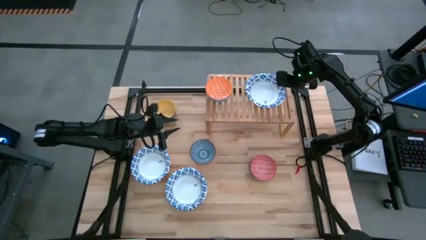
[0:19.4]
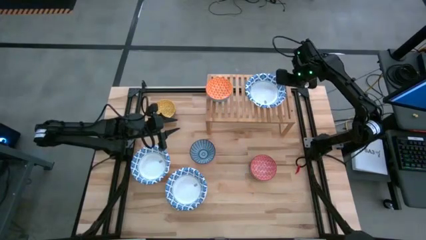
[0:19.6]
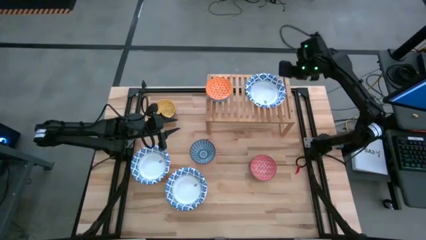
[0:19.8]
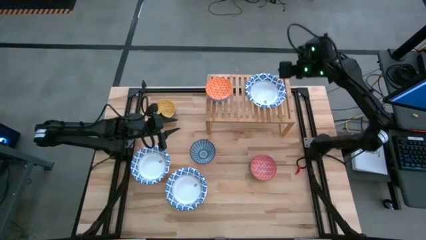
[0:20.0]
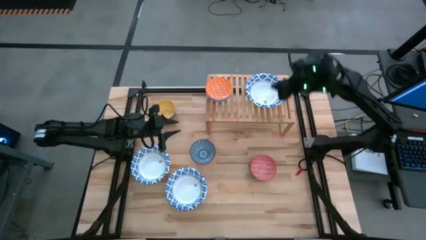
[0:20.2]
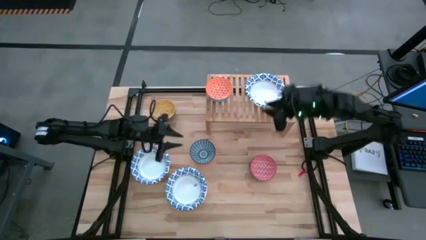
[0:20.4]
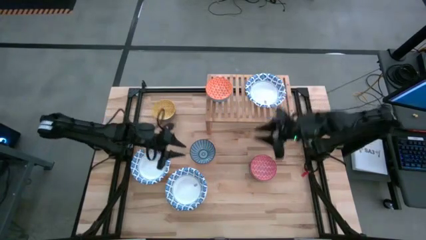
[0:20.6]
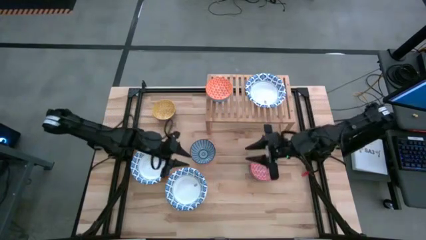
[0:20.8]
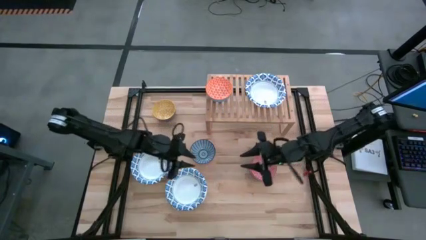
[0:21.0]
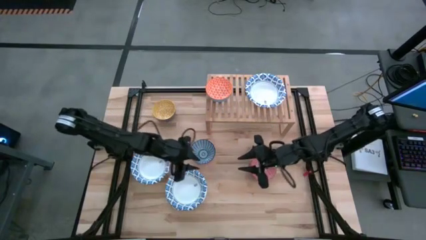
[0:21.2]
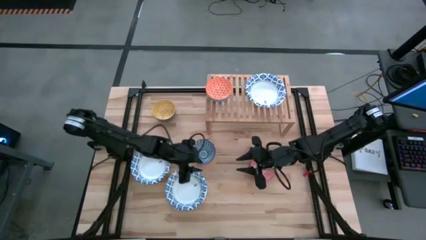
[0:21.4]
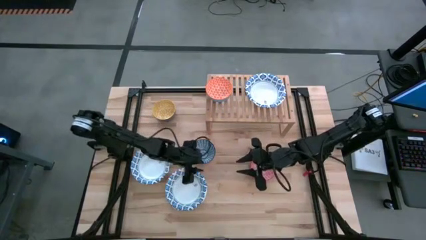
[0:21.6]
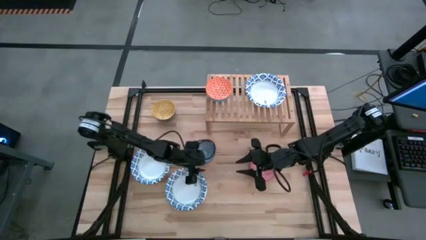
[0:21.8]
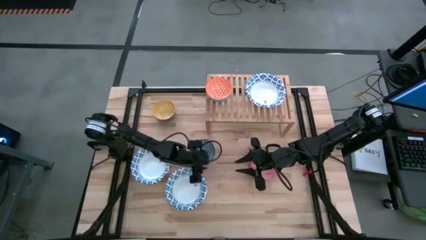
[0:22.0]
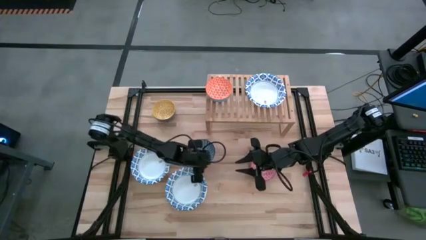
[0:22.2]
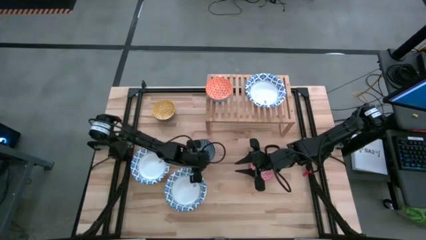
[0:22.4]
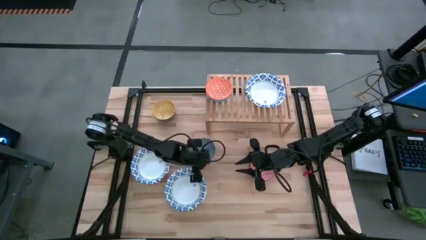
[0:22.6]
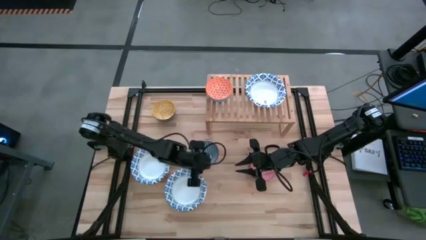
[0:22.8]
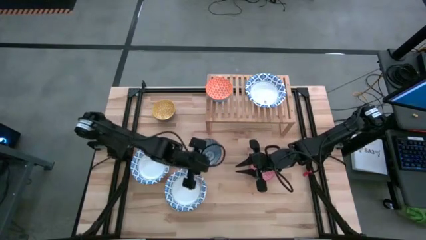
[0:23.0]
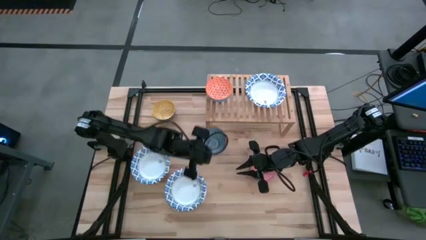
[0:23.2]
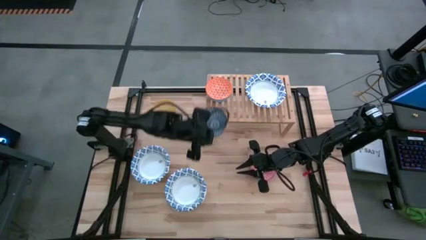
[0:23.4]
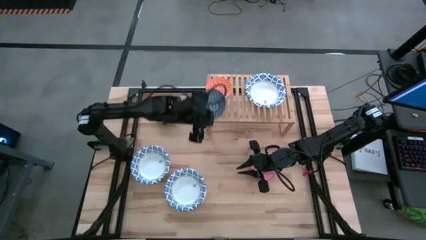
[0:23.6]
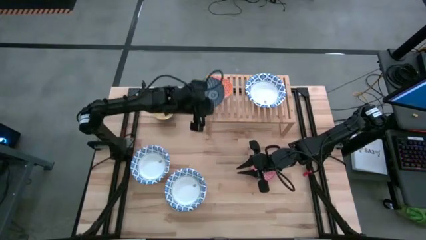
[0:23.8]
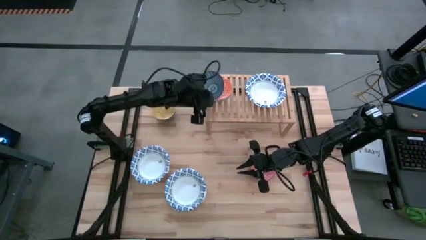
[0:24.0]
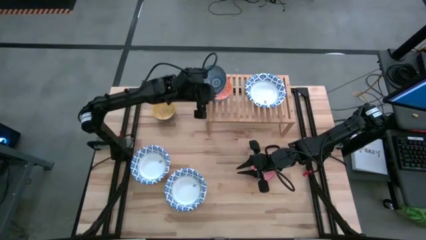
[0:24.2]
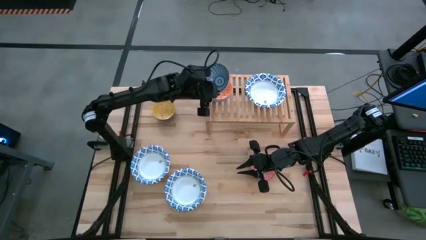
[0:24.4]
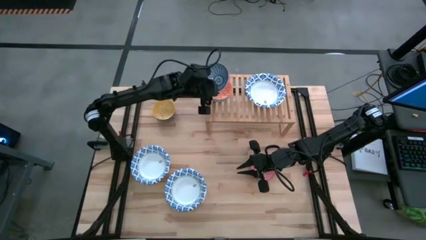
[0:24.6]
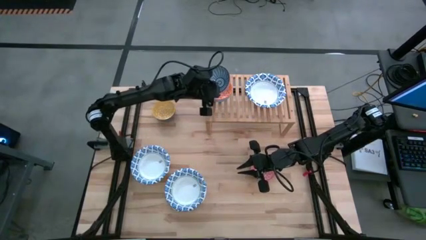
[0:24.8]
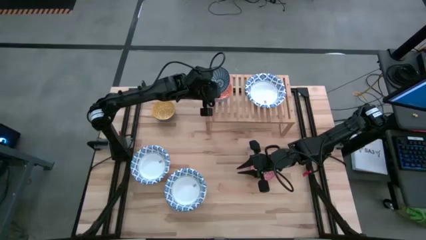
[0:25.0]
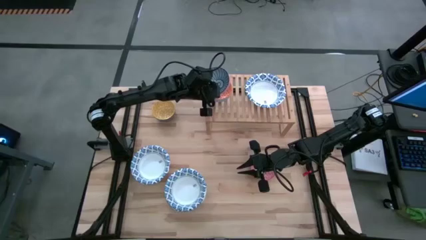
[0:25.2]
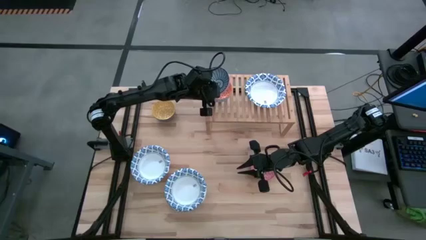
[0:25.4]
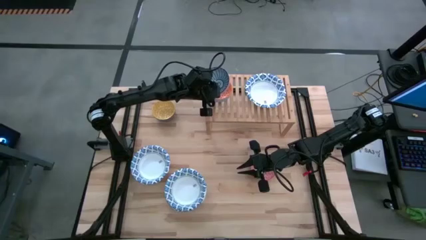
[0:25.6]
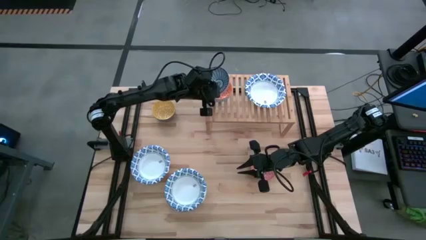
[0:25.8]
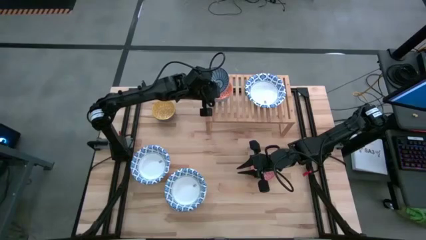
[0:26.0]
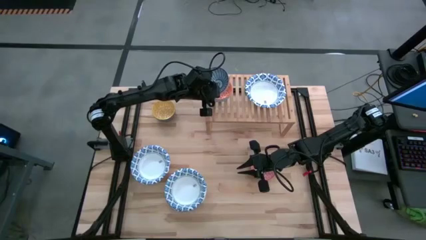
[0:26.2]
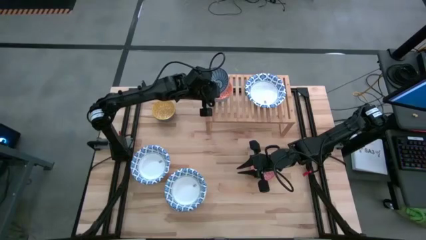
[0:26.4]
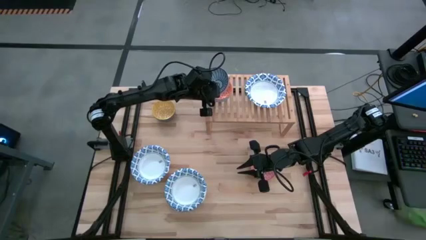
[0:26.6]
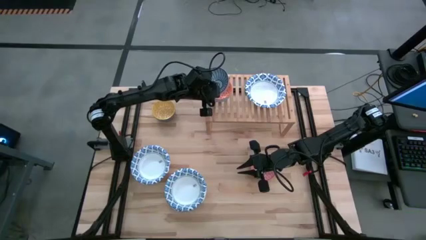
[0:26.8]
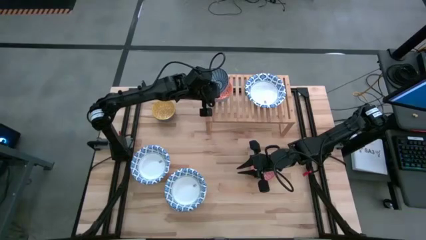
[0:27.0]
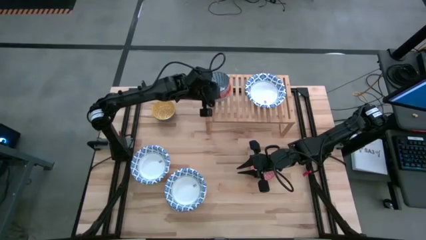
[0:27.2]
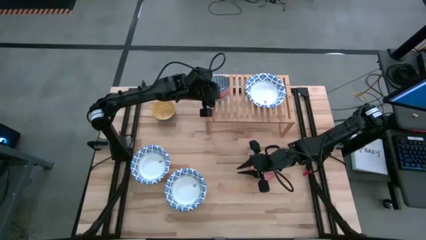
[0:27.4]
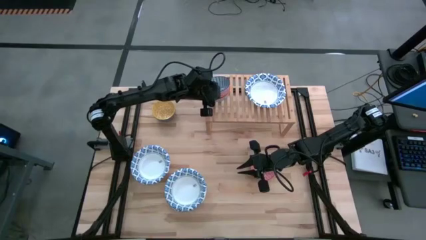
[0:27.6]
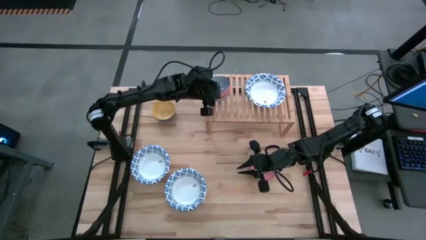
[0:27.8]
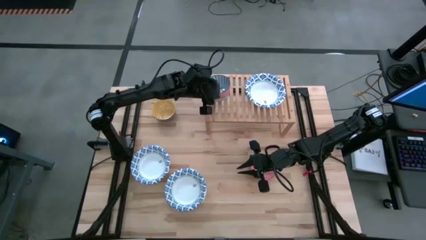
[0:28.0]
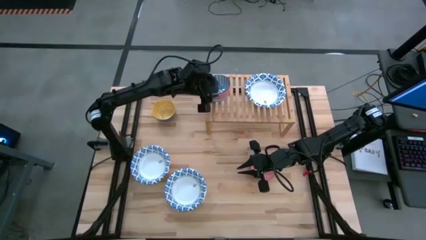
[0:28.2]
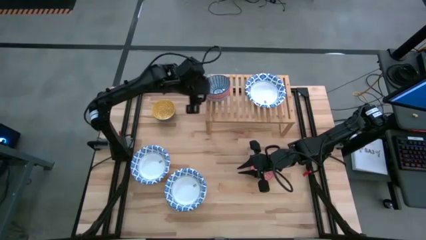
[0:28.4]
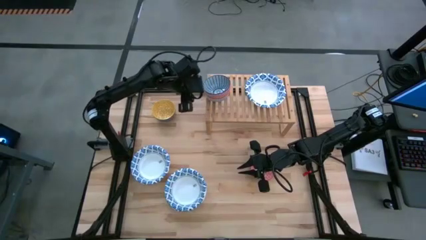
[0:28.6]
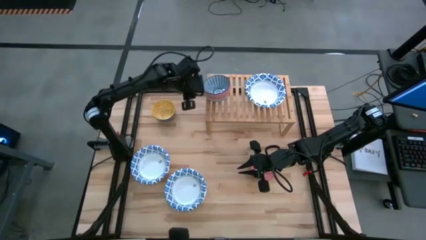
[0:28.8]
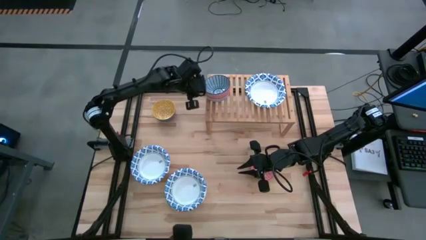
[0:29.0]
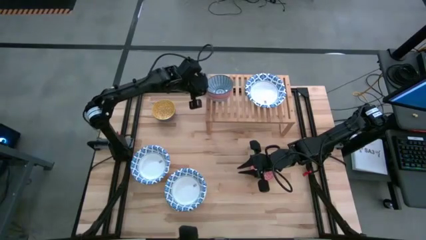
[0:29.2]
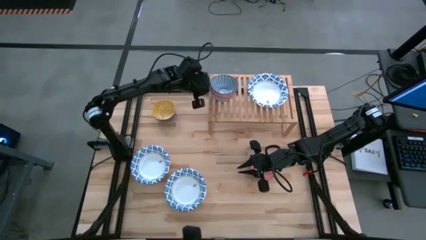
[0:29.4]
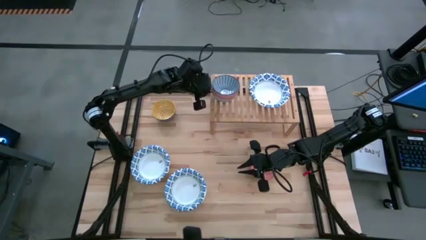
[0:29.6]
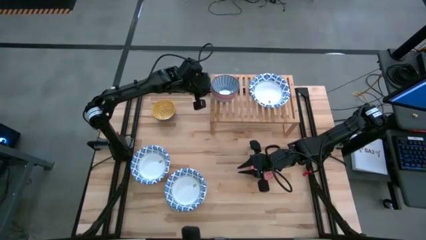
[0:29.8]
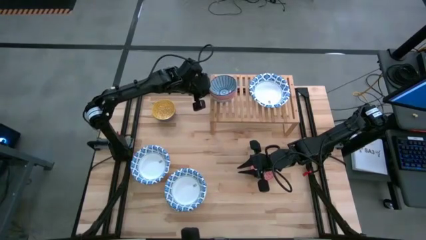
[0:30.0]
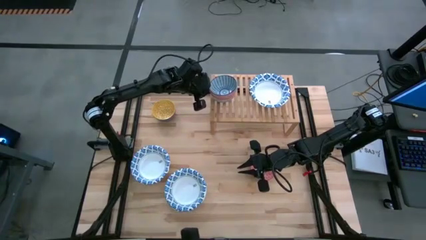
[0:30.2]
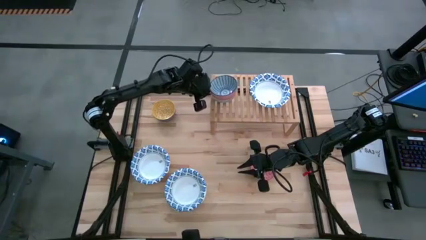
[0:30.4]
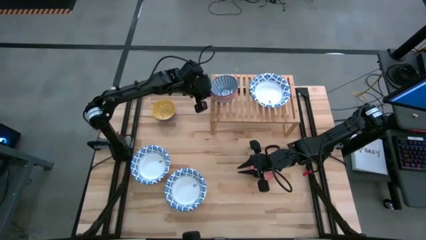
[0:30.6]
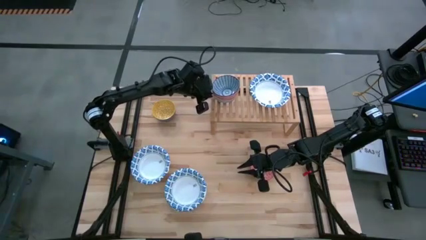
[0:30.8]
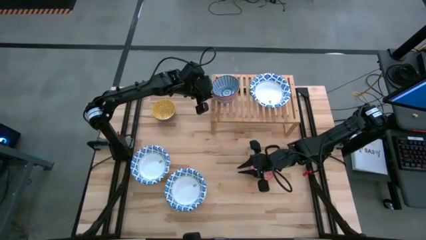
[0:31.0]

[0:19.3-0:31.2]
Task: Place and stack bowls onto a shelf
Stack the blue patterned bowl on top of the orange patterned bowl on the shelf

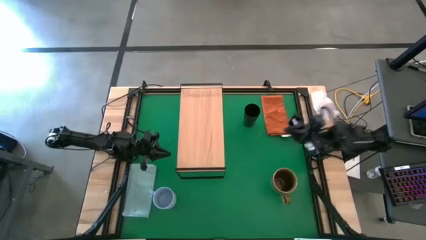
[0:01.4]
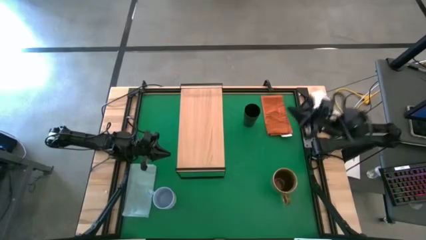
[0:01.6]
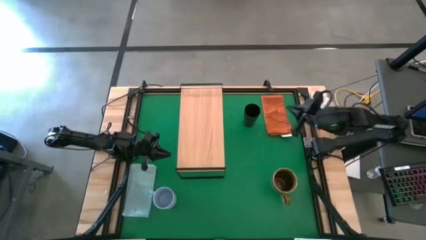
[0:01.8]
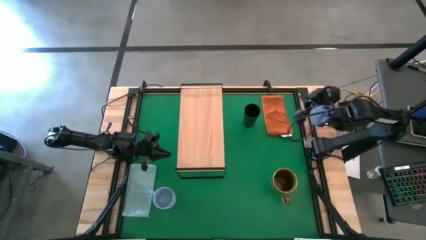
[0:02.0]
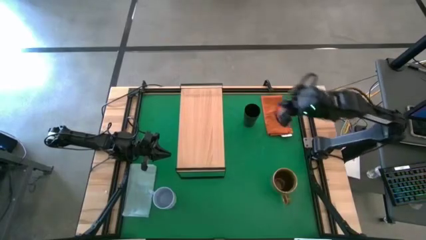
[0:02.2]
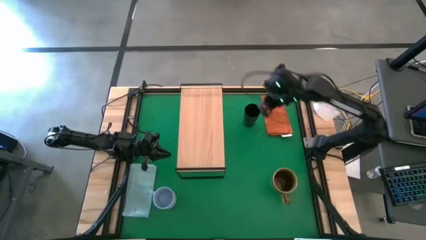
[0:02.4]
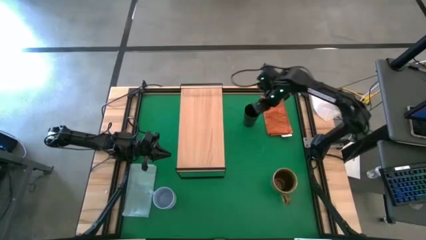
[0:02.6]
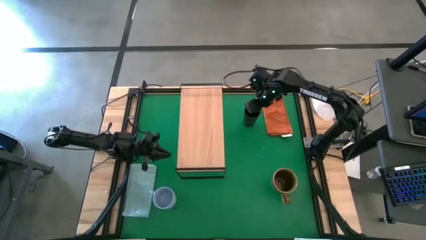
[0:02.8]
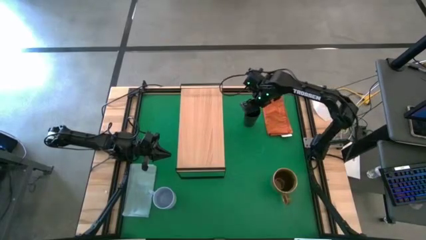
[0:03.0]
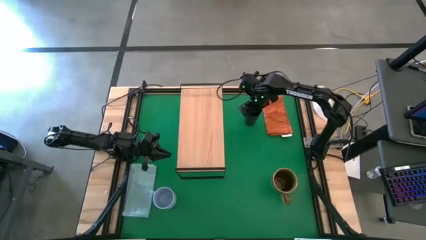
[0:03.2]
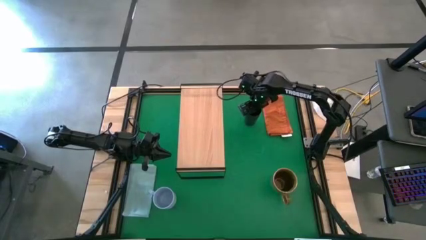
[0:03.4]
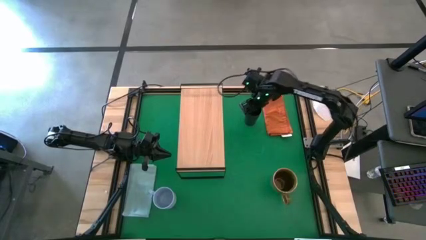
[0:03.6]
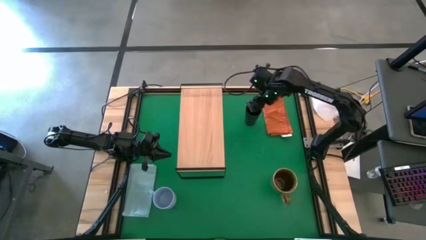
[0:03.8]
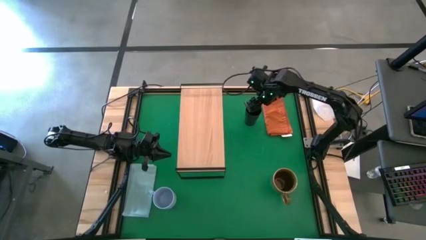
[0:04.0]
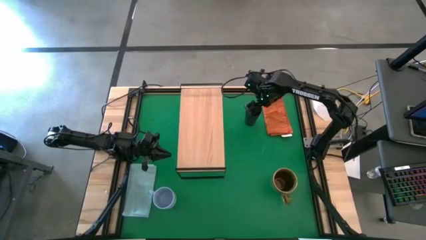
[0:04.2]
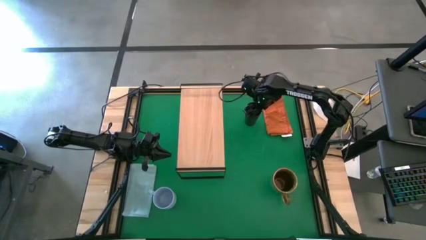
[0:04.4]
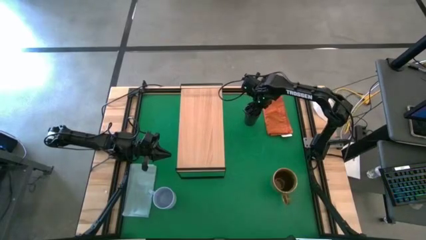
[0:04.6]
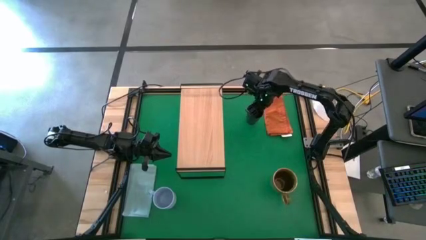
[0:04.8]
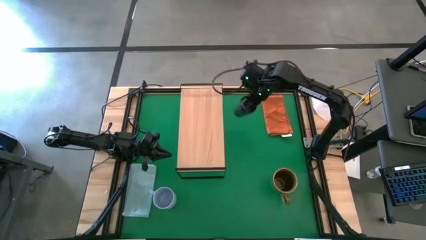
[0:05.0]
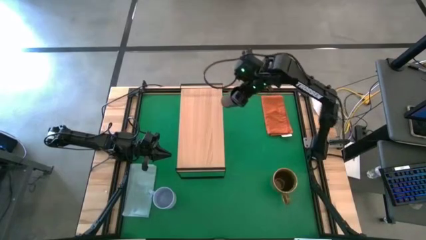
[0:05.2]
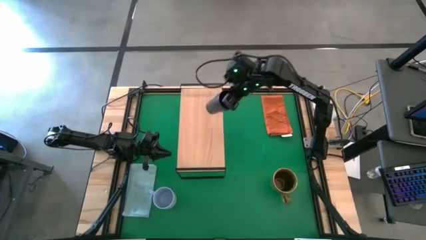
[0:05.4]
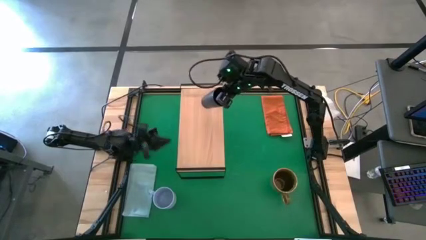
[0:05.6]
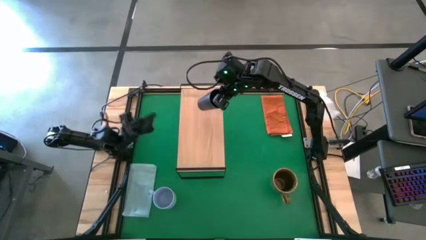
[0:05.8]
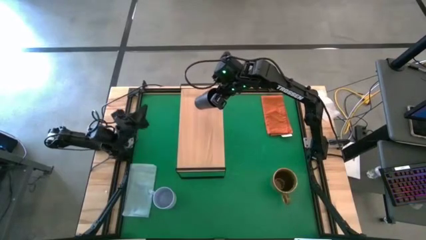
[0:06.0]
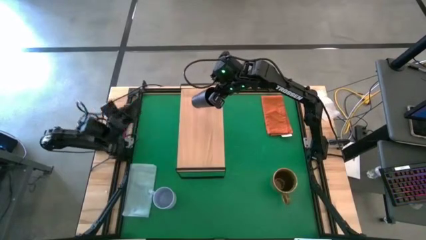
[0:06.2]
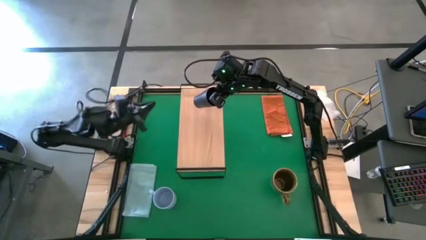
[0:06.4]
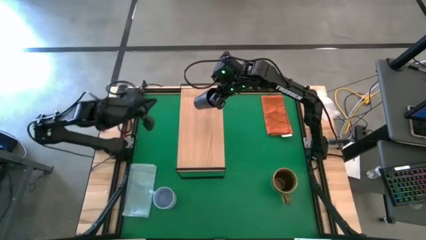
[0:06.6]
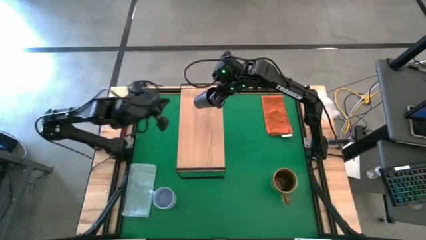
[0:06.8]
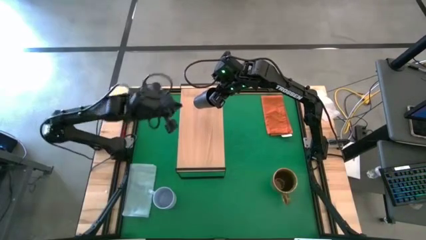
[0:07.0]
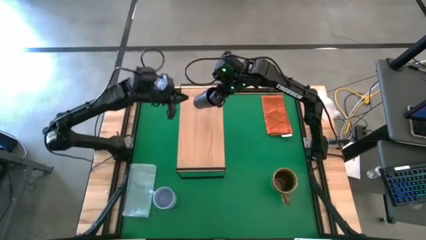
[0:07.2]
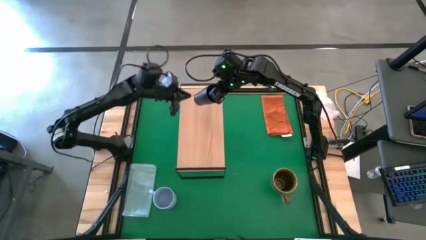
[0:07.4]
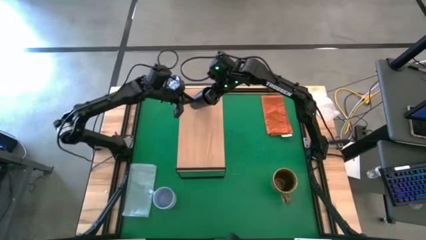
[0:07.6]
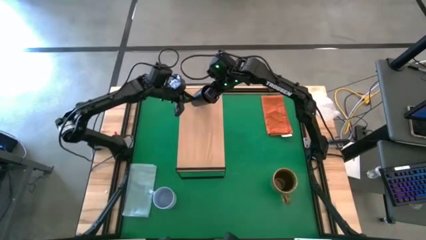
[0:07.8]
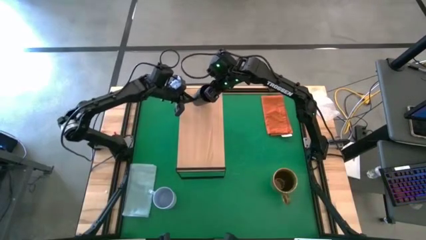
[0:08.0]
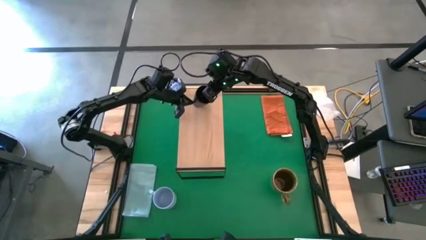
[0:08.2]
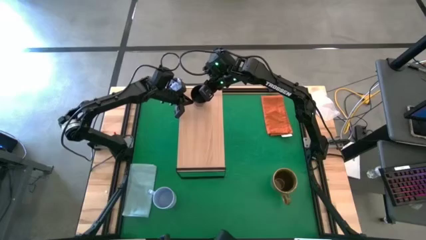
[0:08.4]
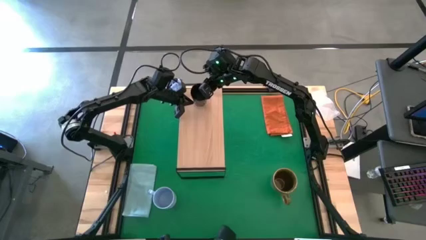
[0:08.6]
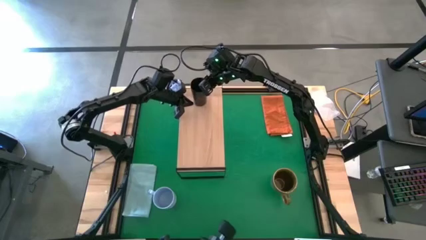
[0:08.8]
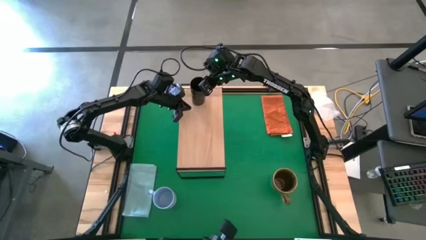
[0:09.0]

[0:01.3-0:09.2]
Task: Stack small to large cups/mugs on shelf
Put the black cup on the shelf
